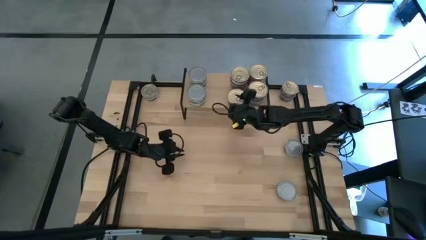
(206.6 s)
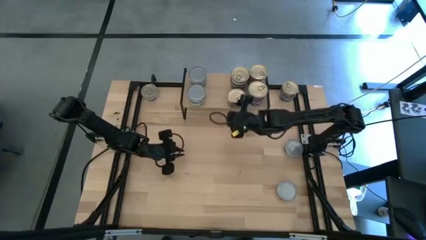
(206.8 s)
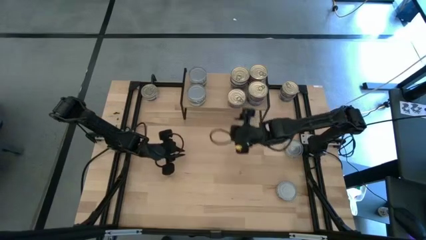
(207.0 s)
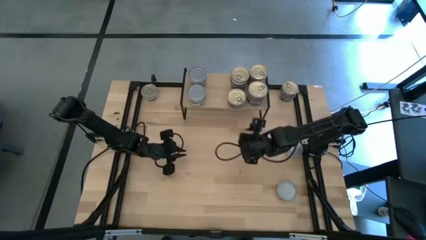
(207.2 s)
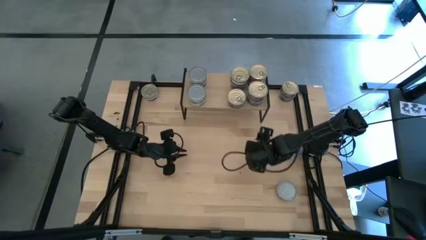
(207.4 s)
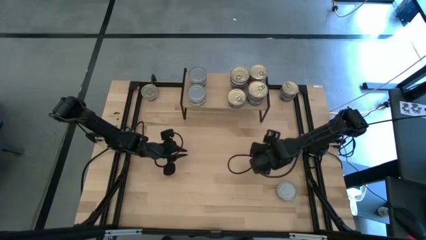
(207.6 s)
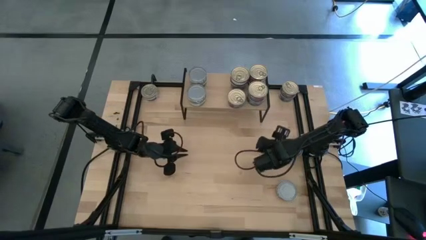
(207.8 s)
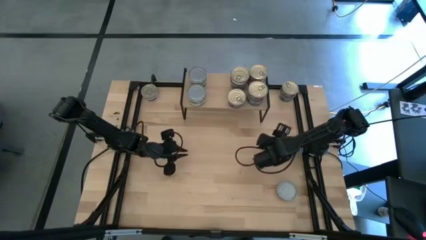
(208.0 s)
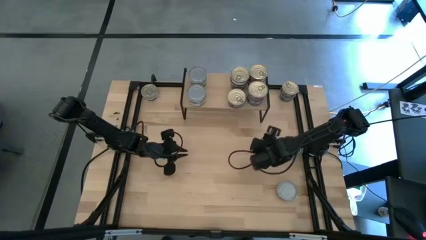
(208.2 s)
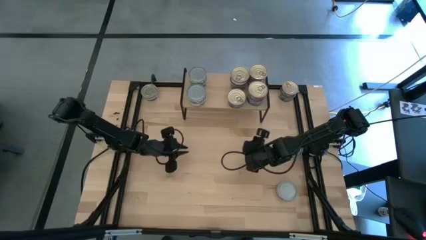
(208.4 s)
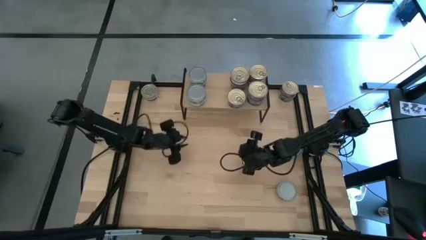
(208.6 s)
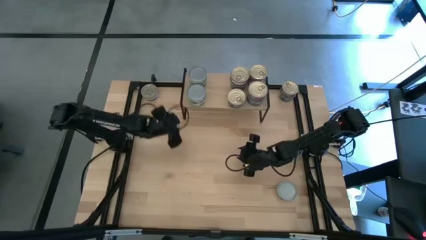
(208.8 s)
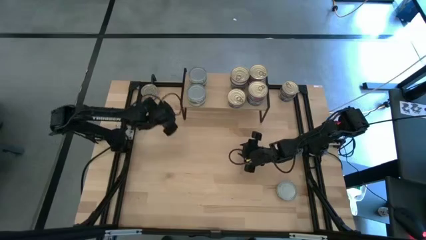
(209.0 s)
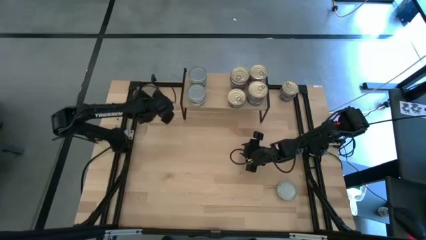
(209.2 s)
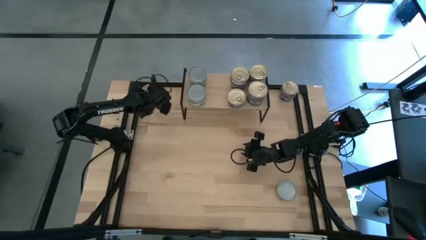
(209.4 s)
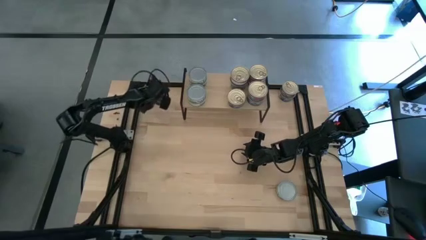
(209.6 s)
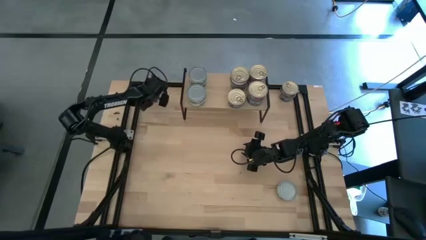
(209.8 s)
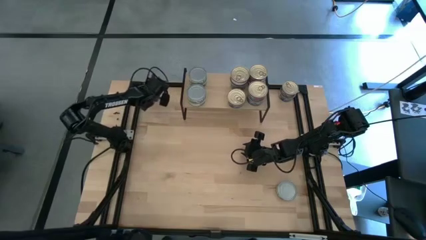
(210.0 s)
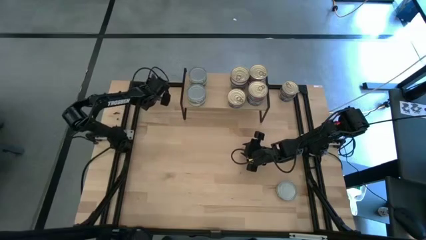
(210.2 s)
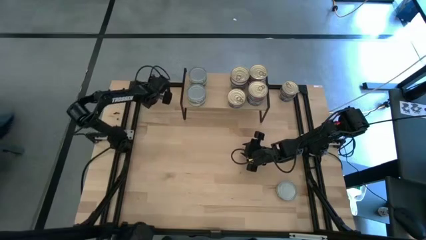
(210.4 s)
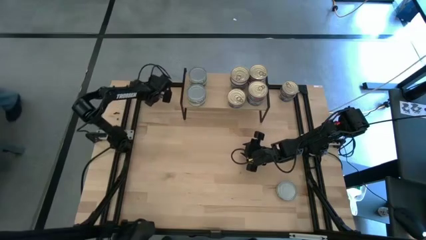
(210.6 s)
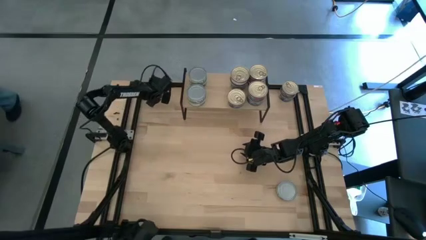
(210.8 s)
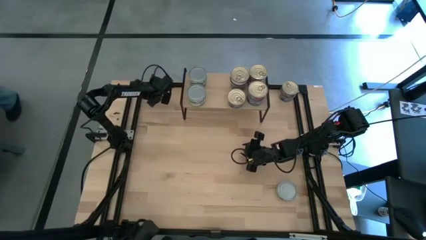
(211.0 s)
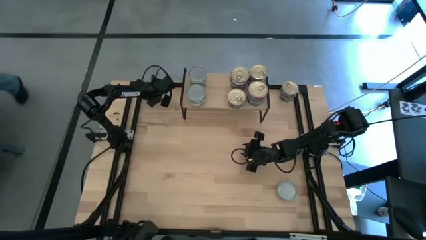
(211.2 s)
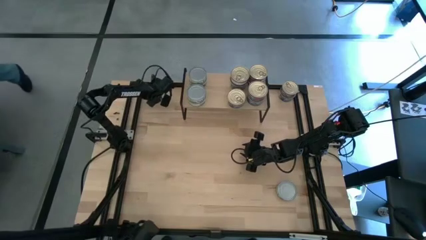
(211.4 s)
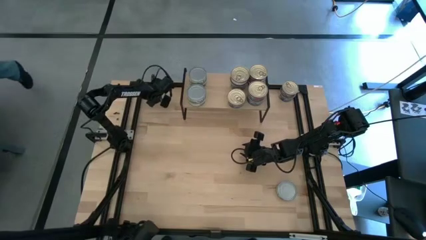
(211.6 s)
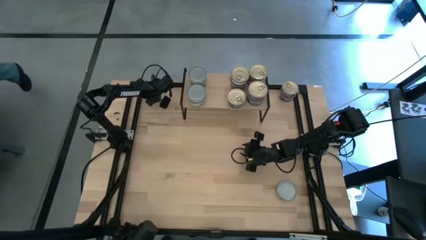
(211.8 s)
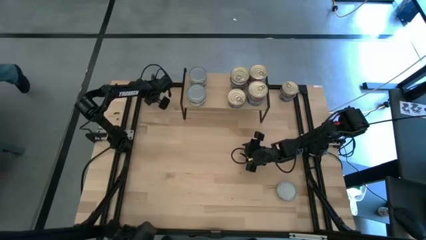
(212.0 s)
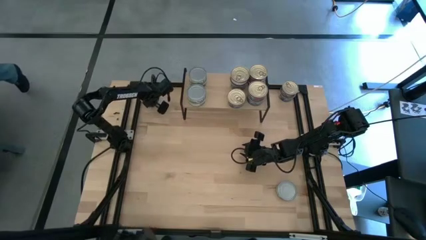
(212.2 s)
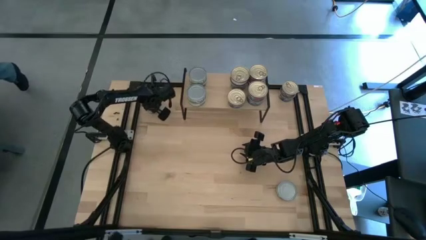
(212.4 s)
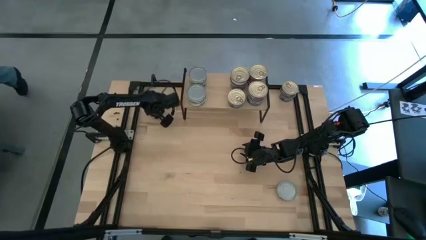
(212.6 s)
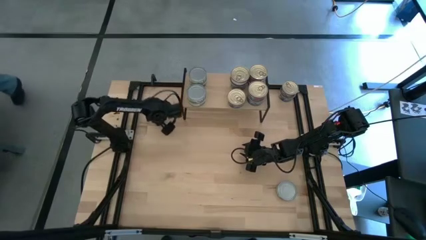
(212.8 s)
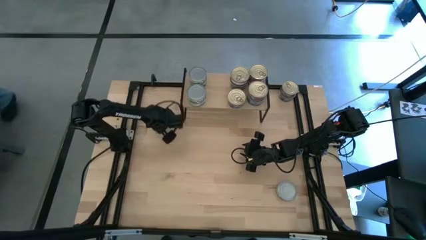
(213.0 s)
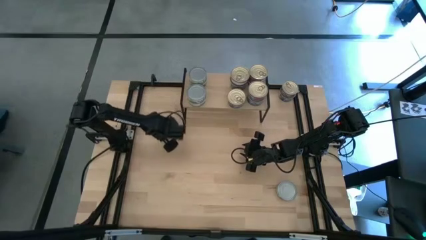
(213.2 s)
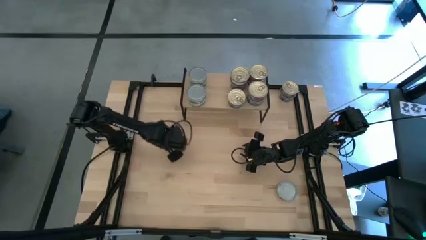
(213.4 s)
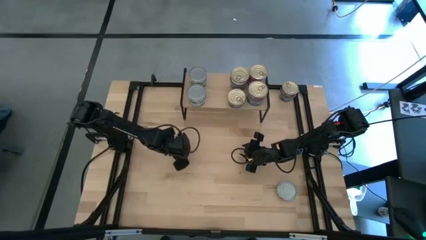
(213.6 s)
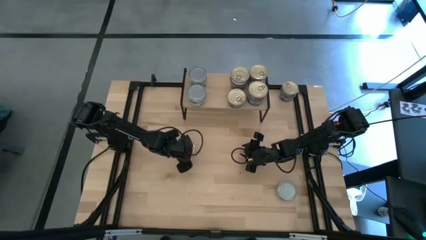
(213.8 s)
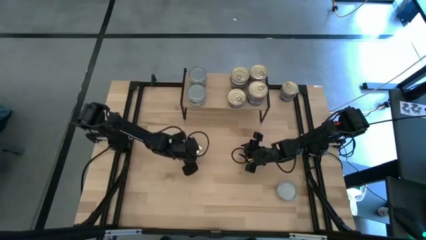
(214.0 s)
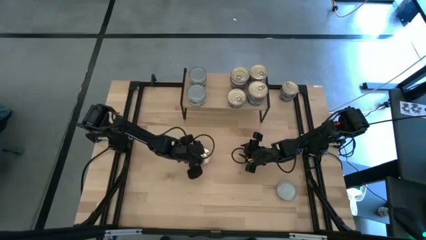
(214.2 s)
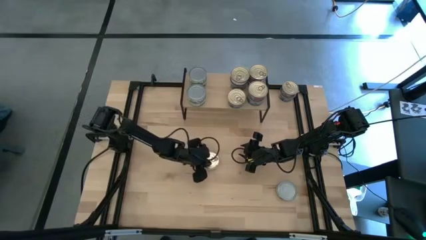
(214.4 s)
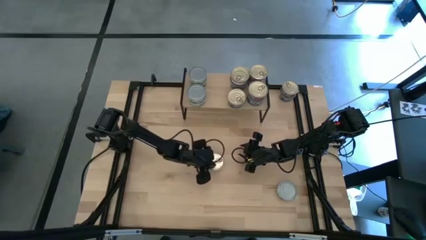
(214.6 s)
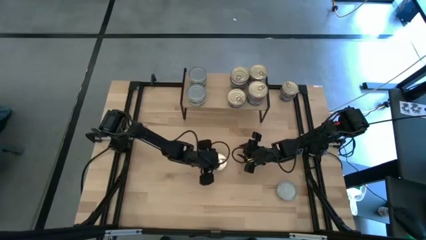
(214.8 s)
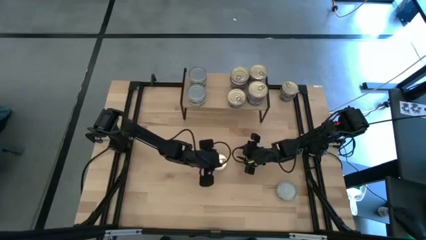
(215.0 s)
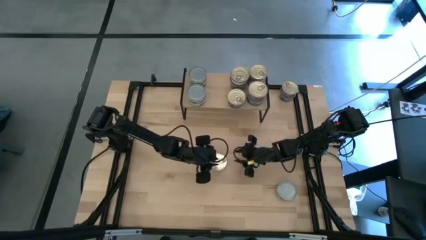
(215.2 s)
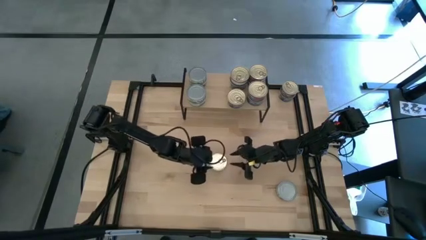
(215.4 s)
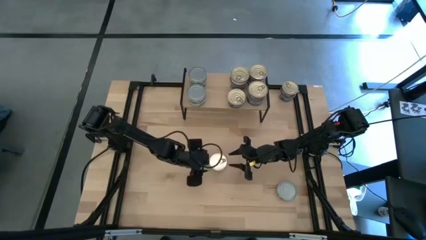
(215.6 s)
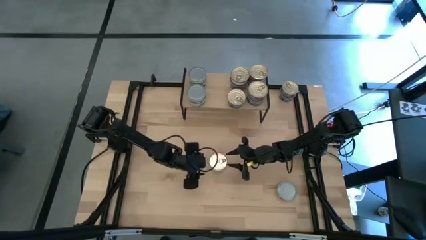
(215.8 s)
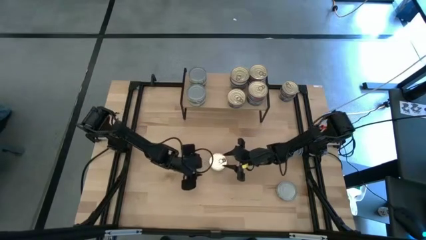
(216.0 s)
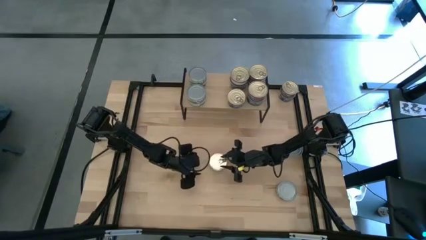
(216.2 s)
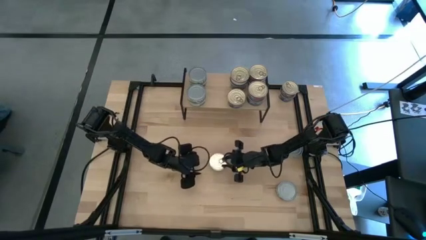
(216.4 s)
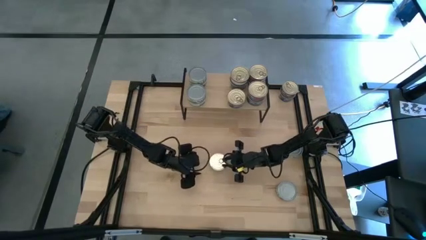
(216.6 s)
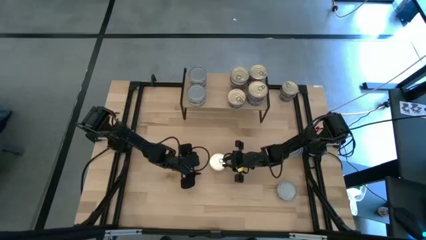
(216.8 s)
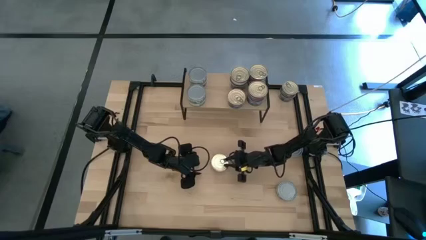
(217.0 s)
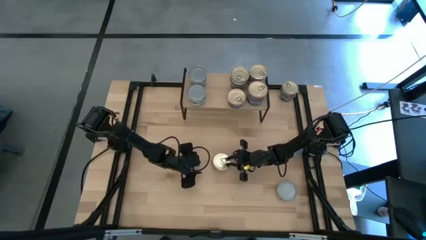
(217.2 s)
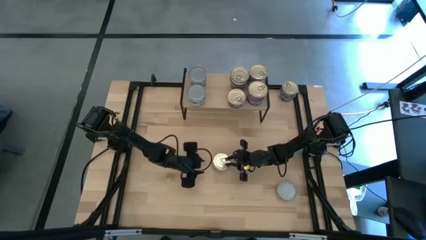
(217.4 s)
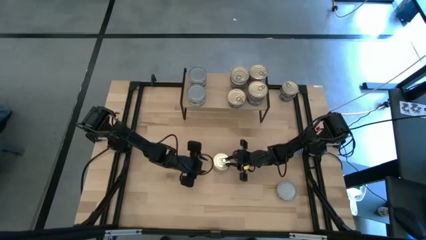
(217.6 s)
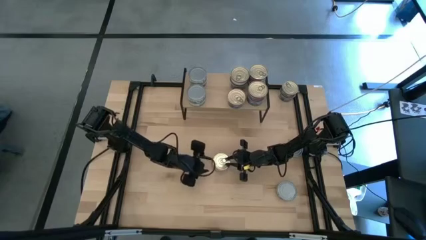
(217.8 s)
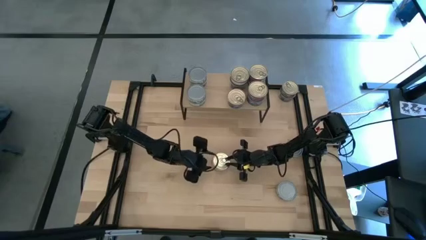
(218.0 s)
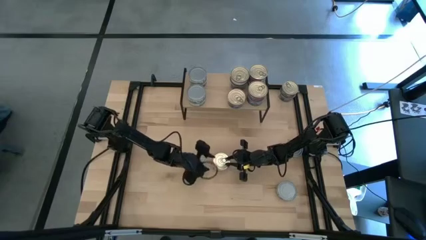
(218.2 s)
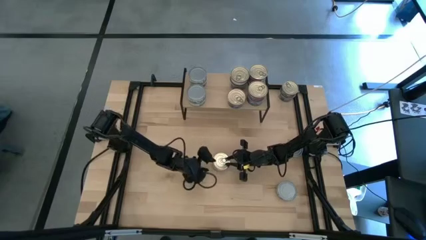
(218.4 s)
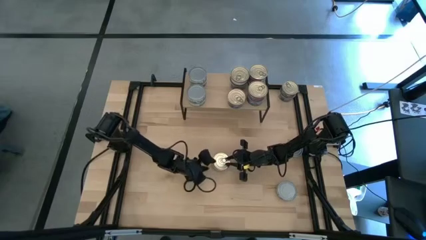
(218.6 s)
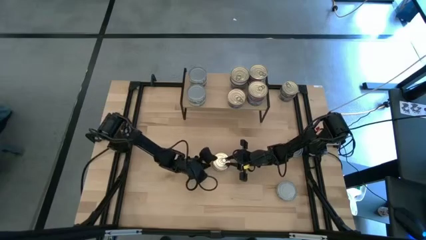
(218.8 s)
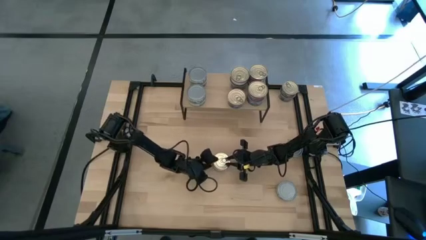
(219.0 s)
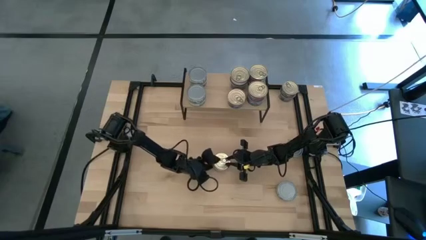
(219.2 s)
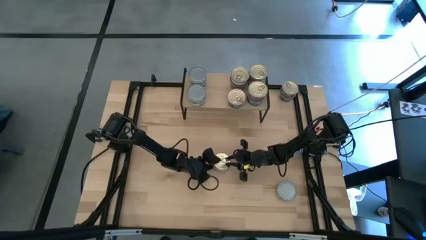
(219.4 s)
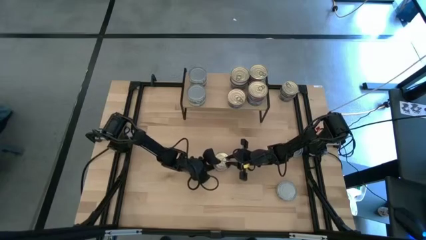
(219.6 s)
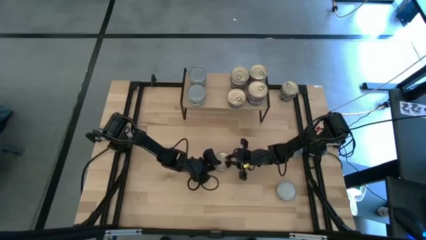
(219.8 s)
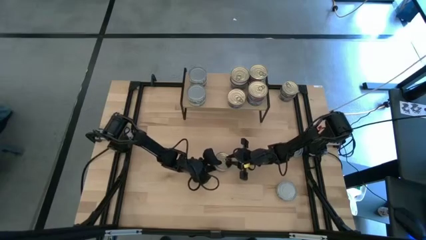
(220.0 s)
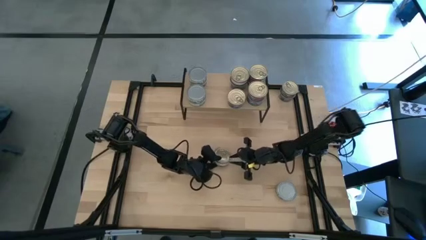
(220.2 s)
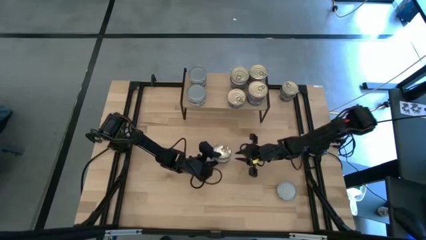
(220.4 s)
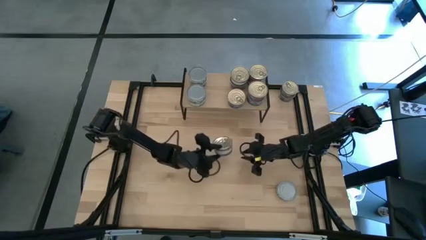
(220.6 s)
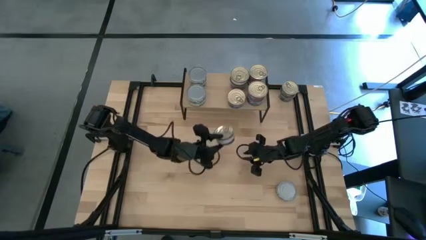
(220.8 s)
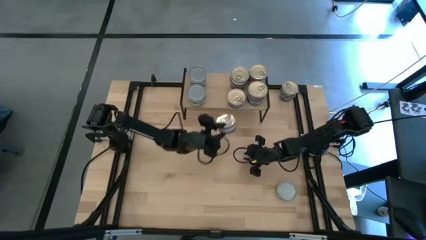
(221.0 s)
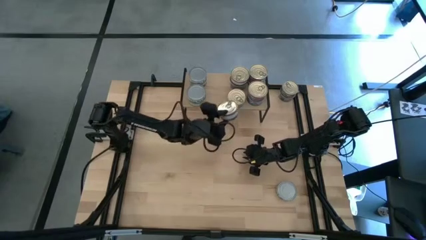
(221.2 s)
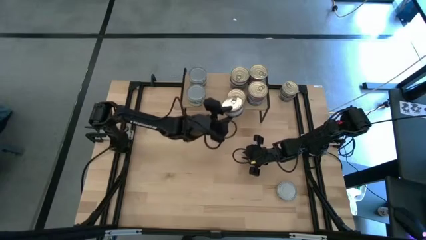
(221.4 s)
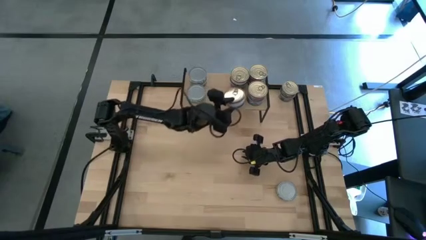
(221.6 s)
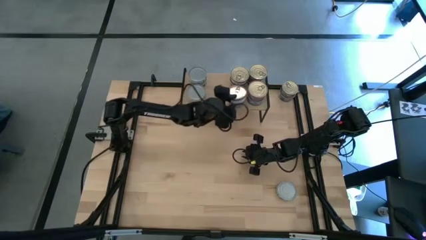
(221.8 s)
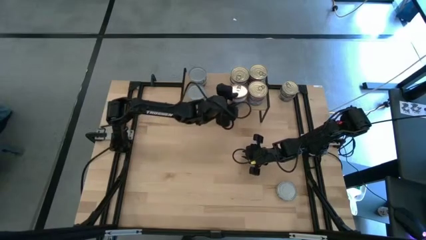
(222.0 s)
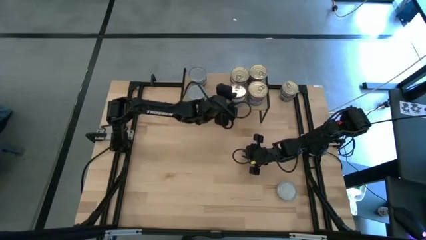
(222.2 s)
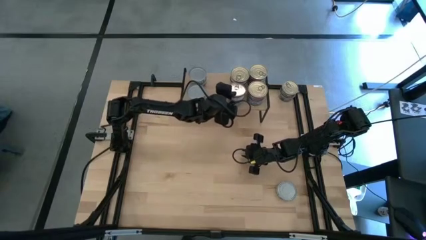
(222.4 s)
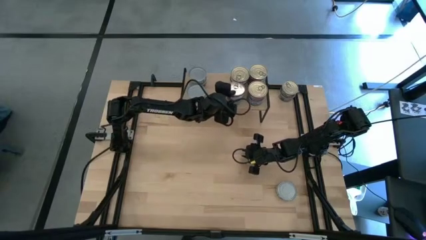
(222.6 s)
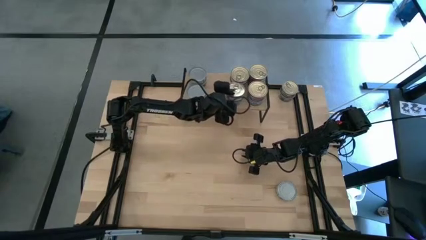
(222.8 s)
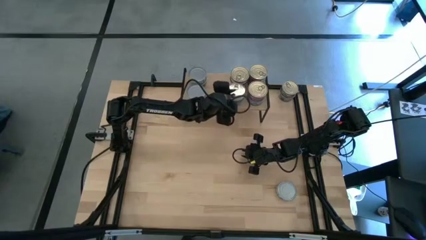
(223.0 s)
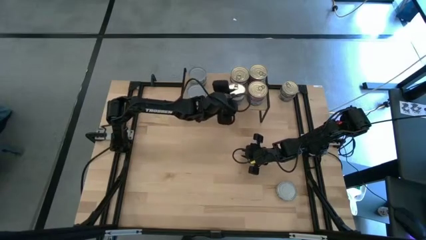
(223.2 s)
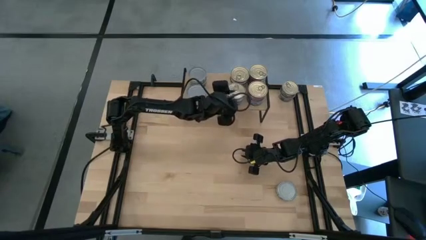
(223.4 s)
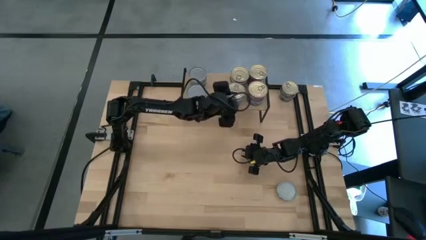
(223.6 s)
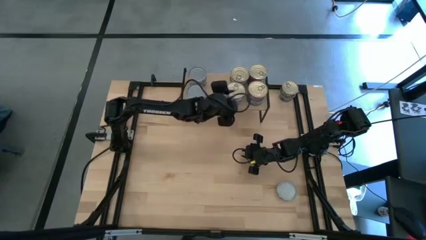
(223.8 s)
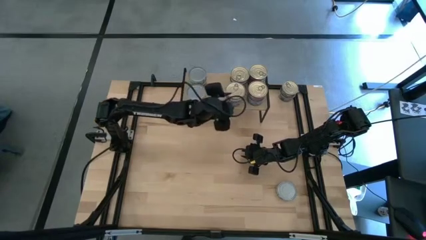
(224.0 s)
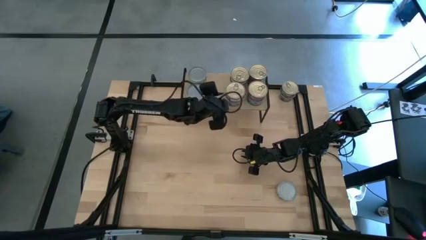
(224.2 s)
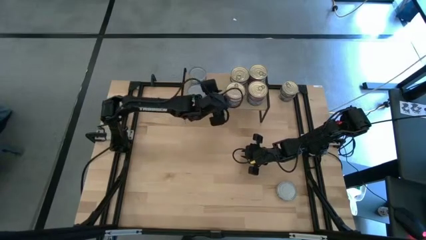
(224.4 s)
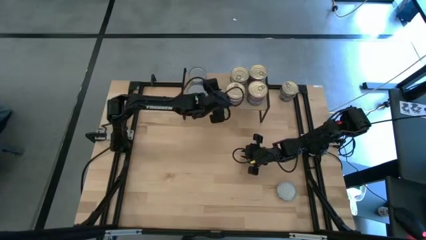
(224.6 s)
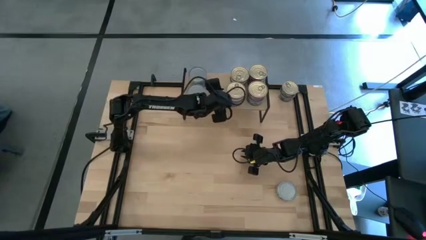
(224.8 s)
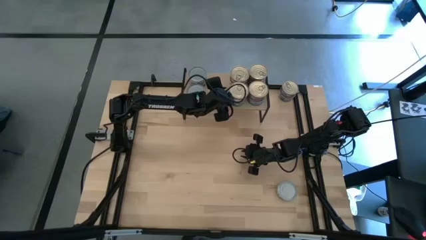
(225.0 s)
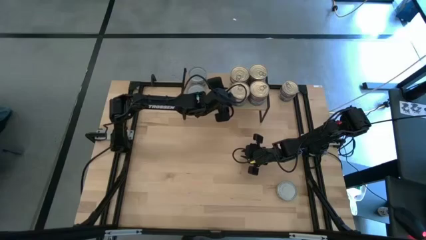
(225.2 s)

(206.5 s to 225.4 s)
Task: Stack canned seafood by type on shelf
Stack the blue pink tuna can with the blue pink tuna can on the shelf
